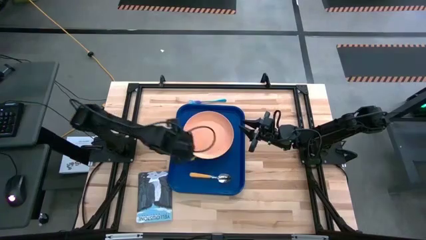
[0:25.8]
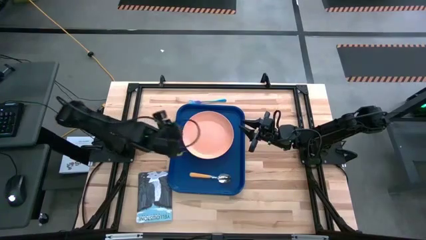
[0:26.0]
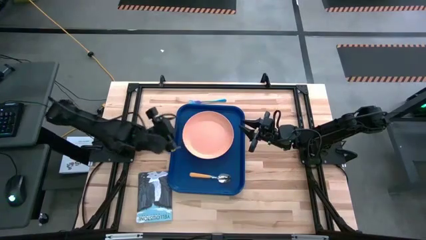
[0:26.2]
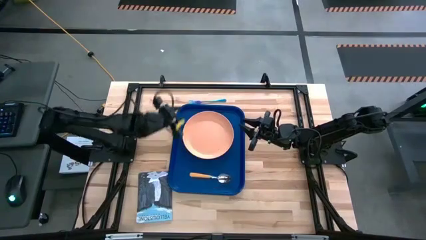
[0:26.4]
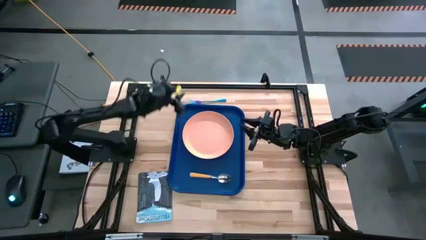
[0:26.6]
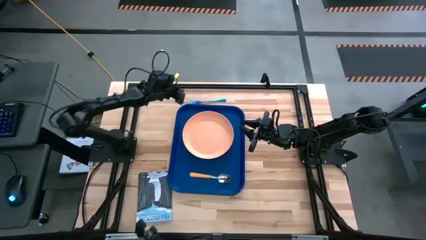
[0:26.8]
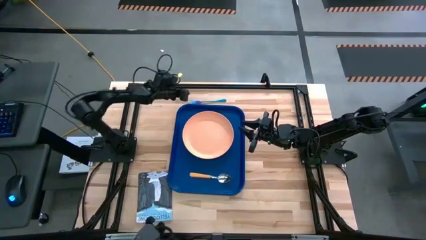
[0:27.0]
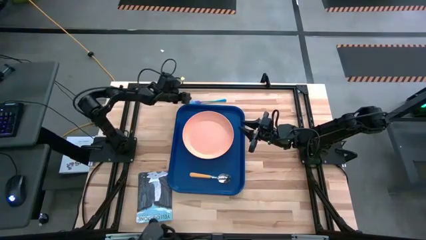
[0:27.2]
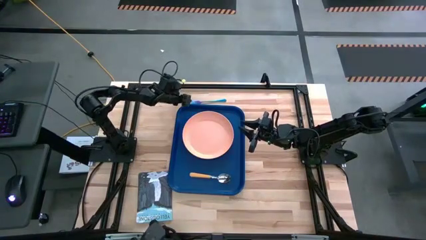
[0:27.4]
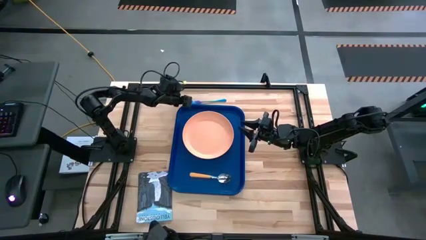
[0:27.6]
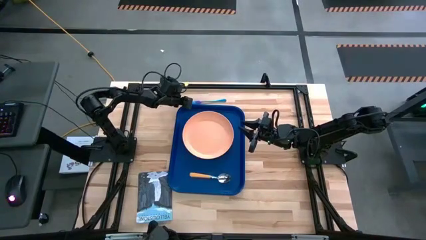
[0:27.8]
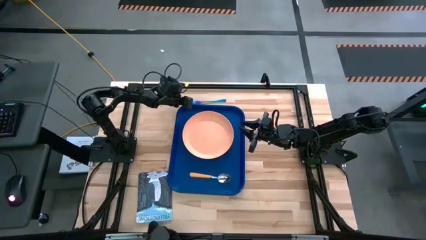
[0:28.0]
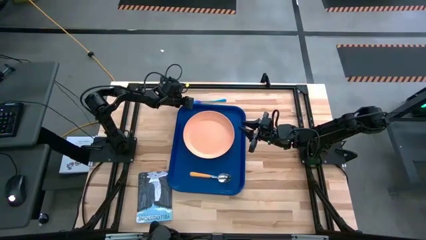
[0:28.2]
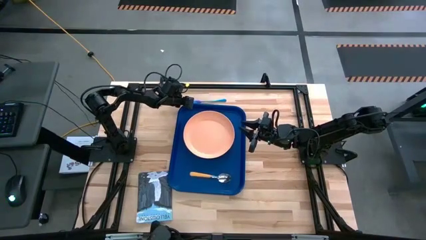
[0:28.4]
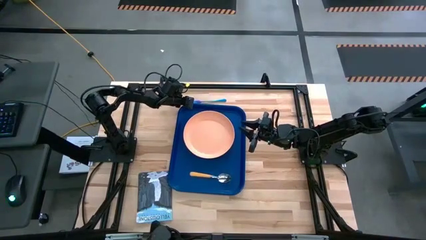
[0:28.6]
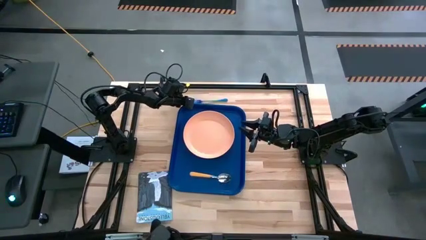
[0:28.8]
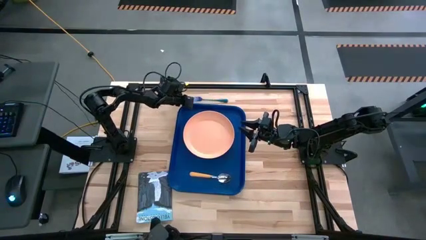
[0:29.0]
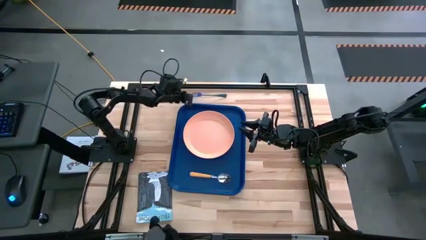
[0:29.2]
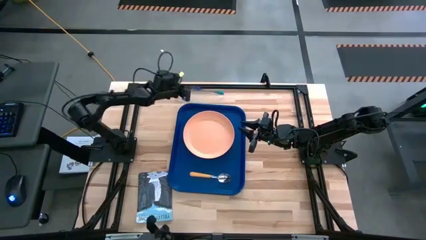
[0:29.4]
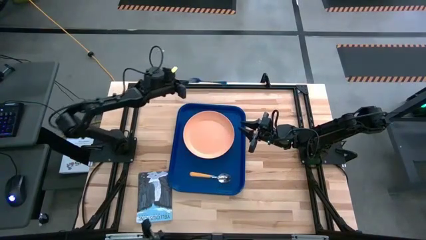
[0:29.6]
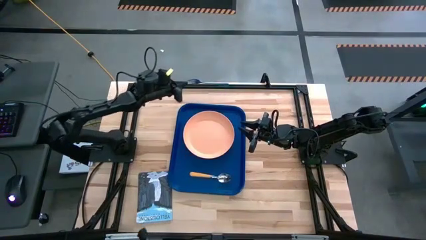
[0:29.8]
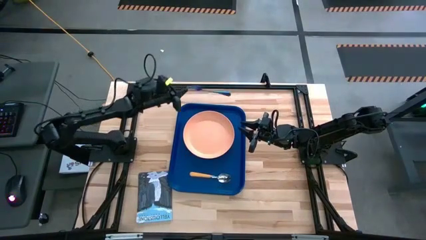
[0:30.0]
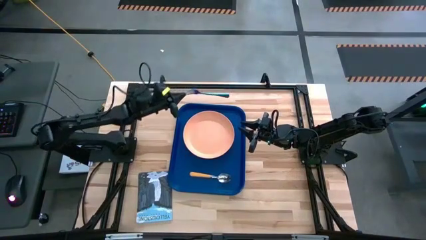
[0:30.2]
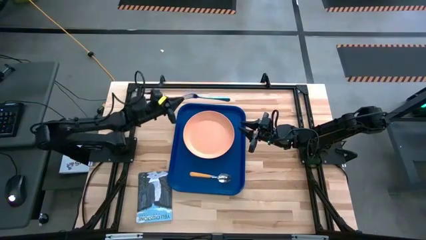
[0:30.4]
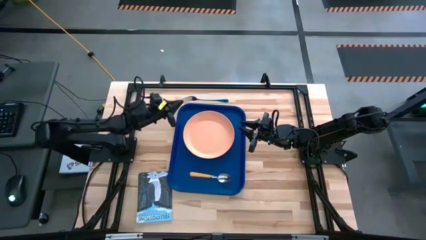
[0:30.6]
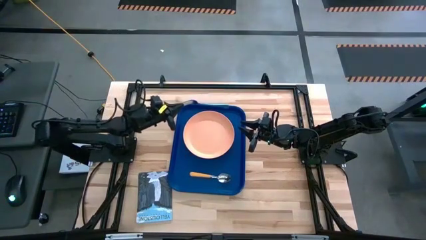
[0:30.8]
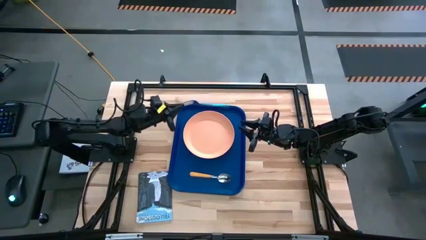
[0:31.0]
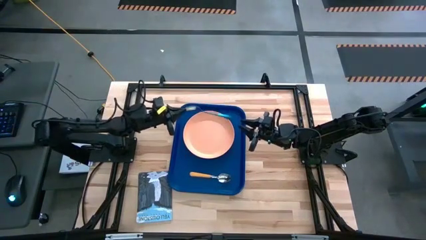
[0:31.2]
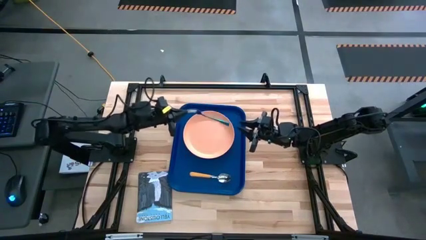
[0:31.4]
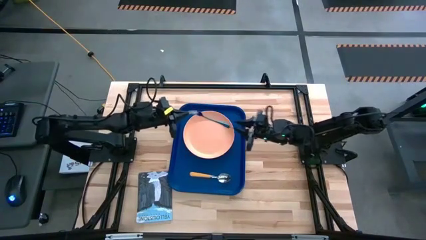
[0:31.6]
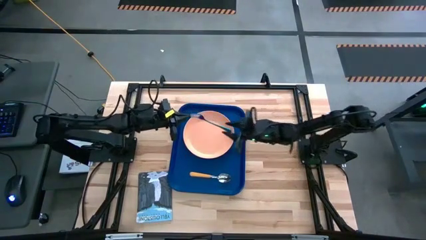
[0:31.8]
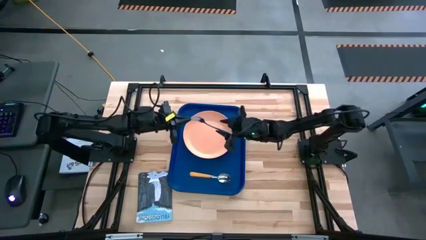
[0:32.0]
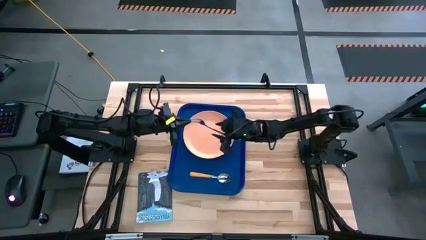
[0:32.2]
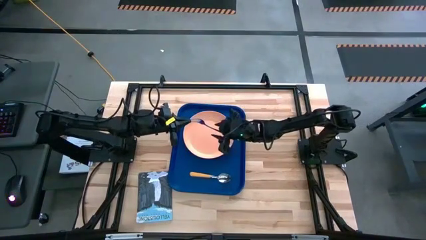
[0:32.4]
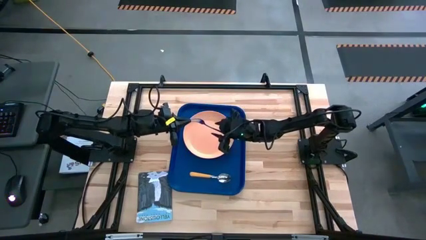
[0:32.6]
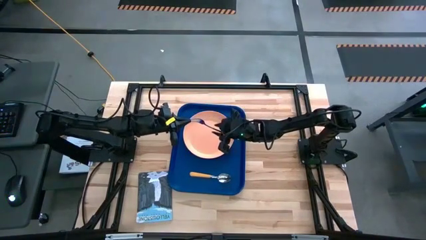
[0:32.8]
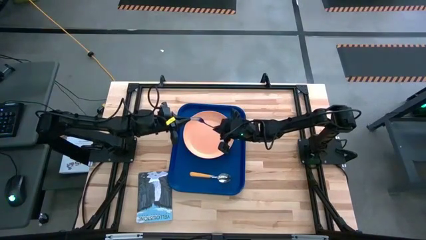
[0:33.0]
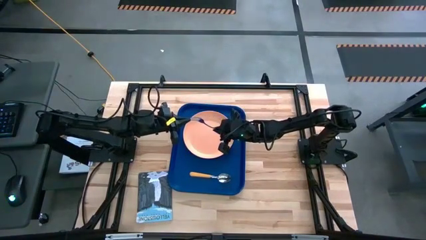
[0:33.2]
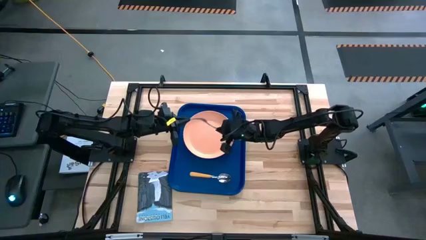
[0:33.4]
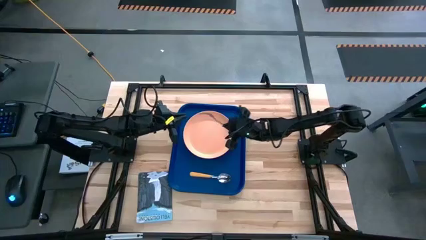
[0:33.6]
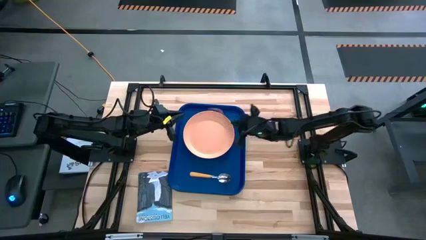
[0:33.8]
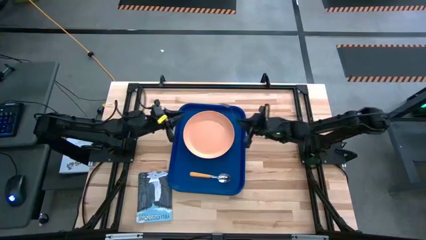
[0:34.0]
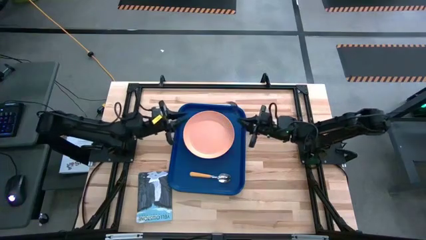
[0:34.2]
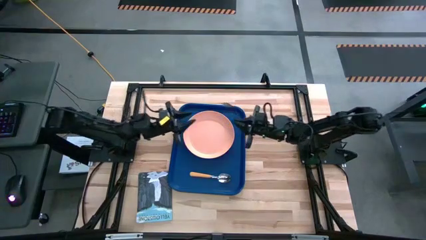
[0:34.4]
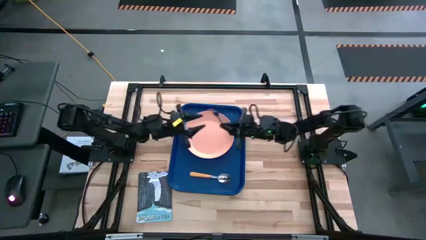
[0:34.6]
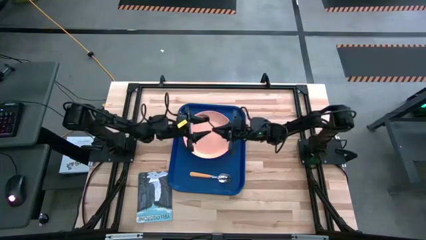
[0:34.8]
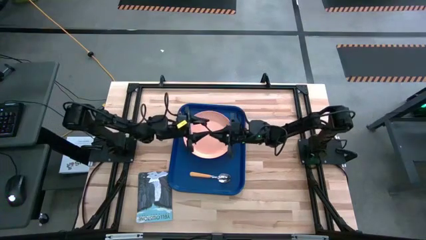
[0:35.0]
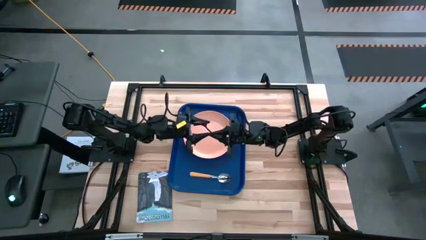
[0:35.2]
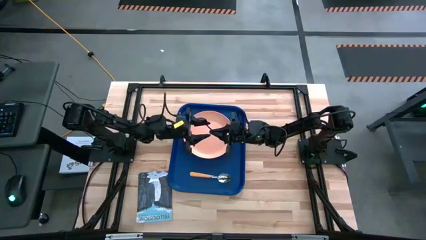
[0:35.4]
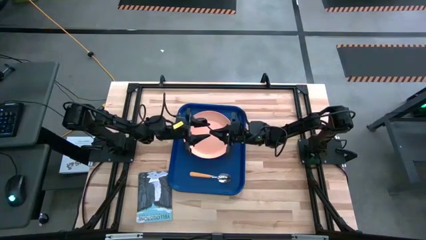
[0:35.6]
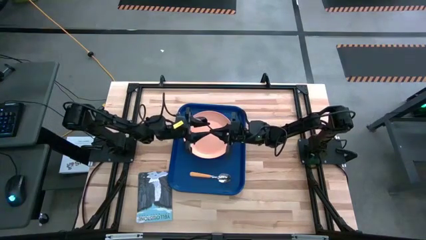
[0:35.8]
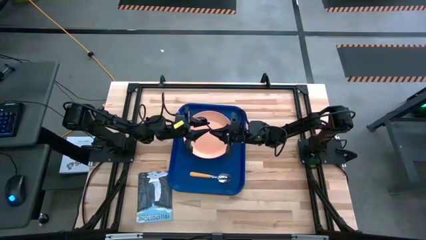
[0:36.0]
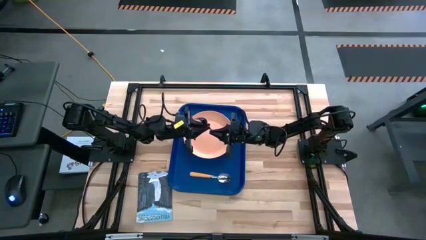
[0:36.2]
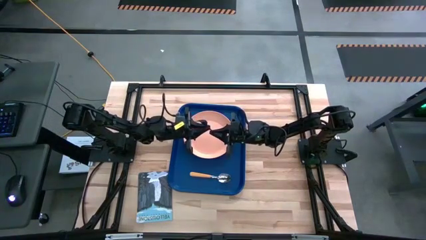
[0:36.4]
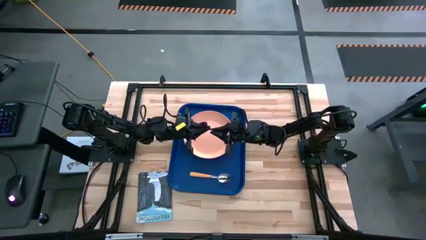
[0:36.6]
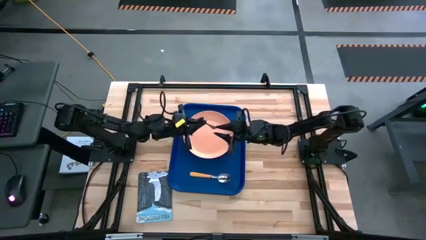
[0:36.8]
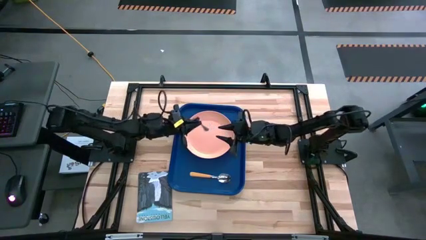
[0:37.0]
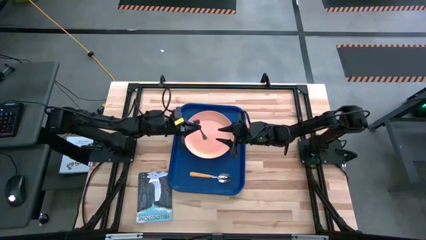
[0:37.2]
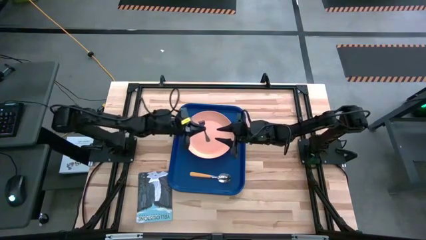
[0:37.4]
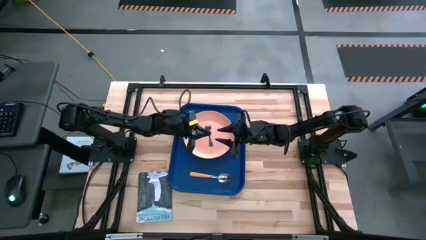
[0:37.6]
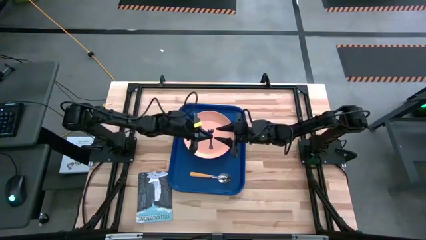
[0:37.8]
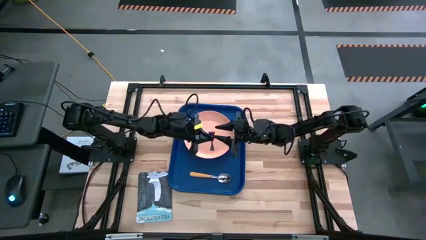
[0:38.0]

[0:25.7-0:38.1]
Task: Pick and place plate/cup/fork/spoon on tray
Put the purple fork on the blue serving tray
